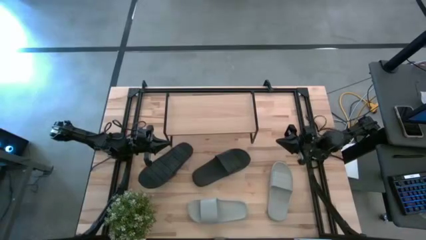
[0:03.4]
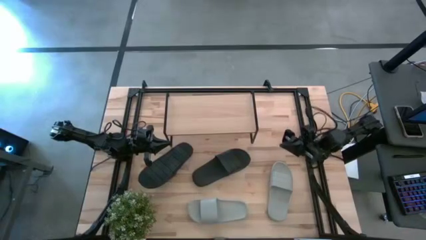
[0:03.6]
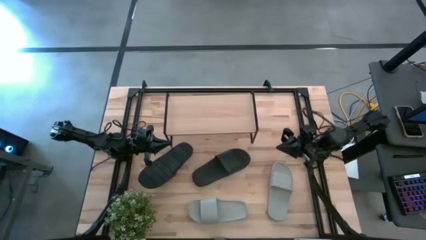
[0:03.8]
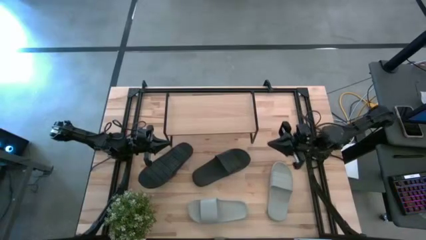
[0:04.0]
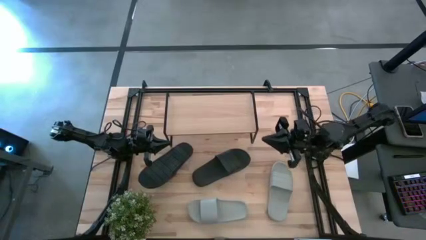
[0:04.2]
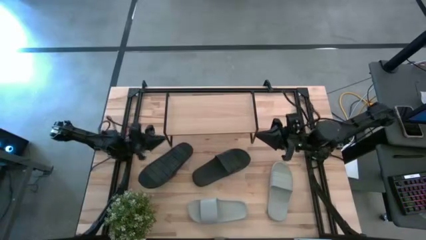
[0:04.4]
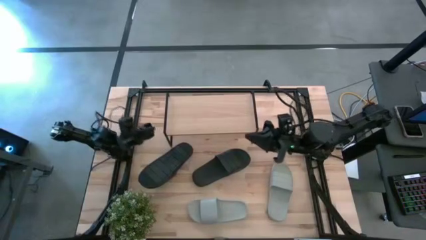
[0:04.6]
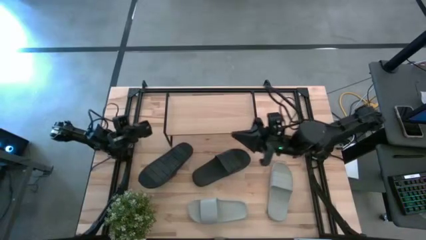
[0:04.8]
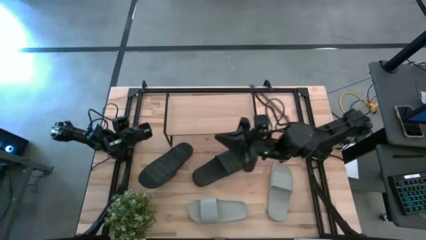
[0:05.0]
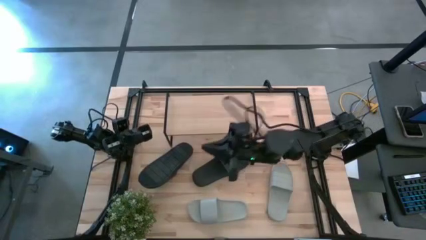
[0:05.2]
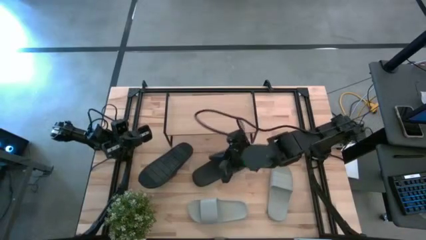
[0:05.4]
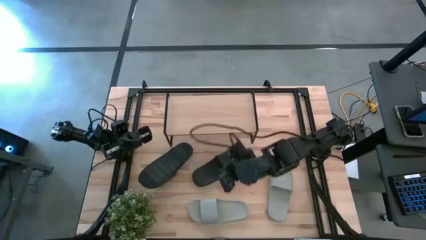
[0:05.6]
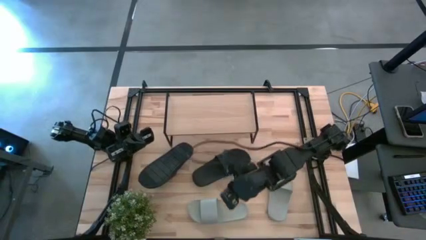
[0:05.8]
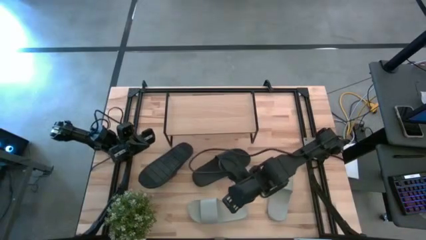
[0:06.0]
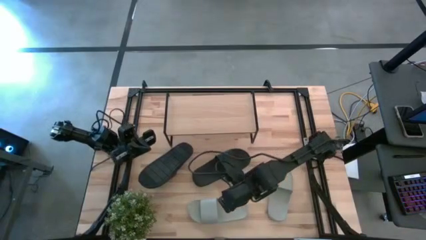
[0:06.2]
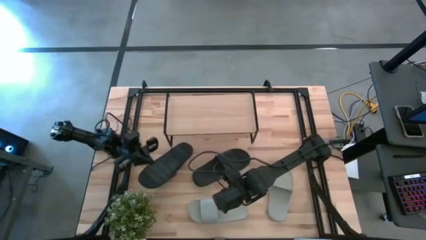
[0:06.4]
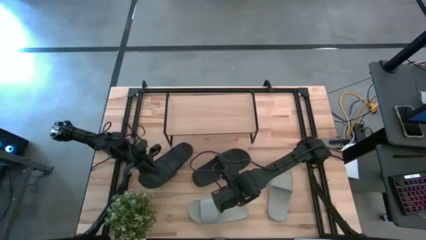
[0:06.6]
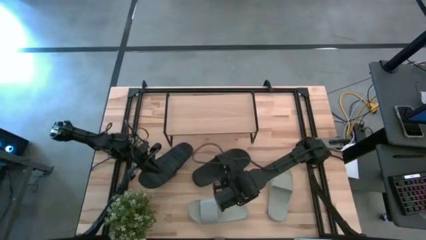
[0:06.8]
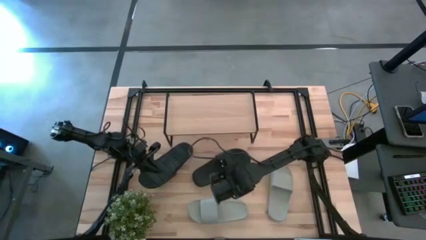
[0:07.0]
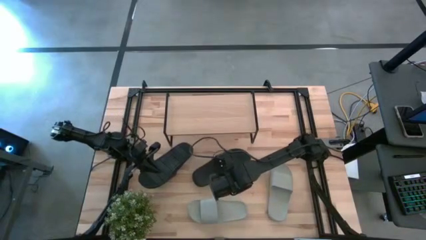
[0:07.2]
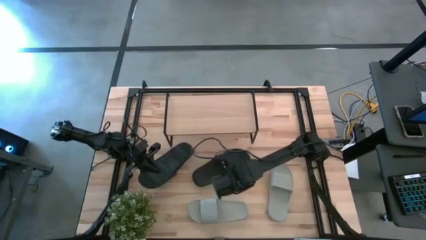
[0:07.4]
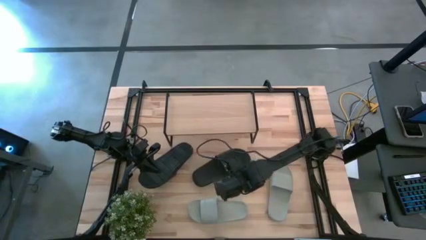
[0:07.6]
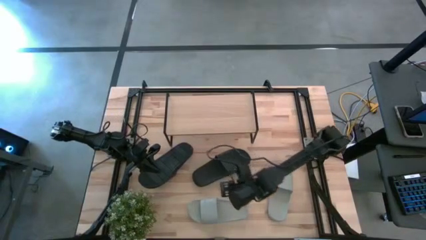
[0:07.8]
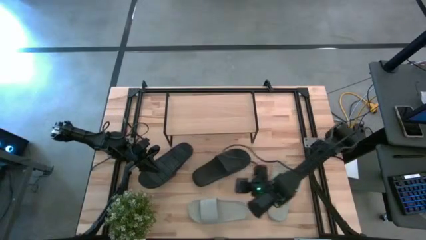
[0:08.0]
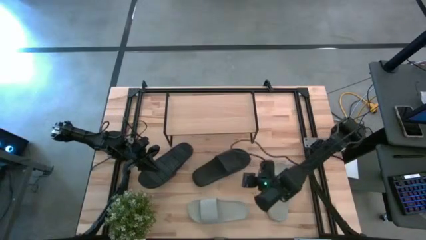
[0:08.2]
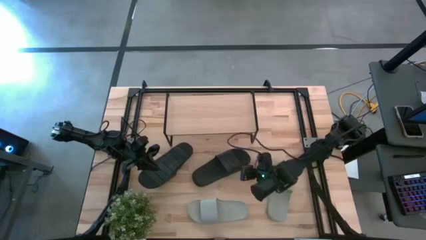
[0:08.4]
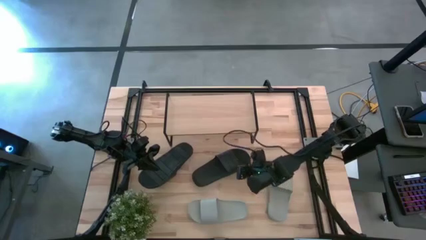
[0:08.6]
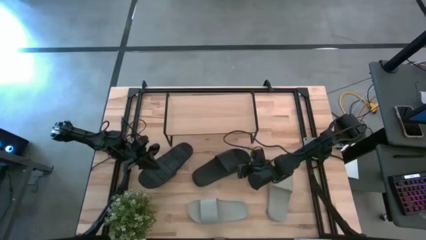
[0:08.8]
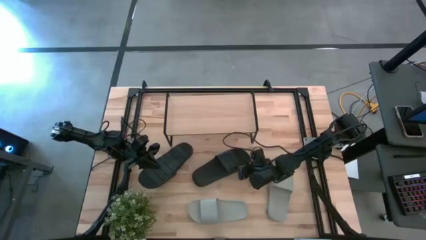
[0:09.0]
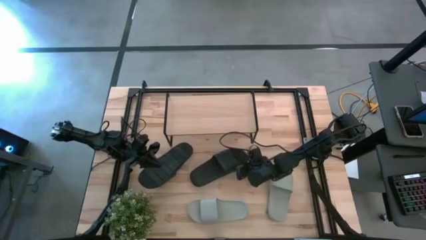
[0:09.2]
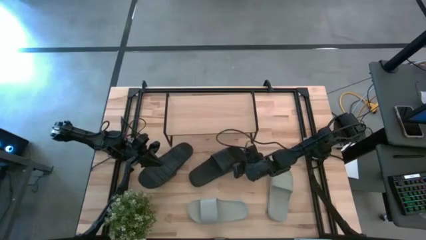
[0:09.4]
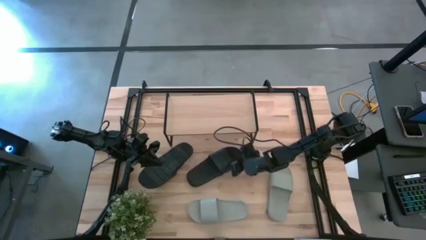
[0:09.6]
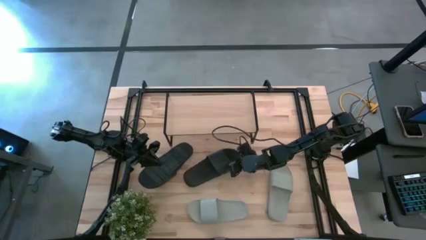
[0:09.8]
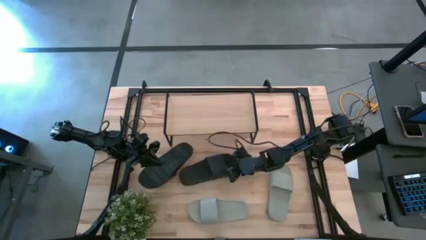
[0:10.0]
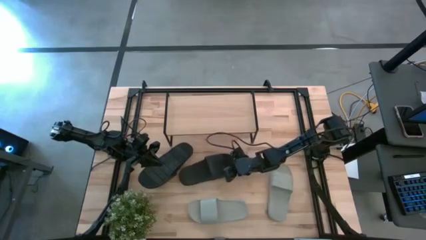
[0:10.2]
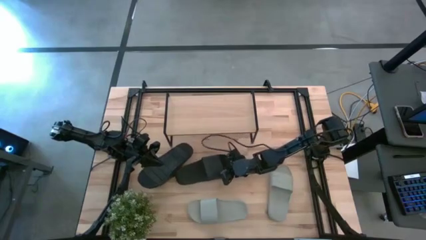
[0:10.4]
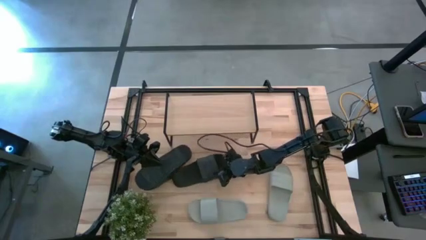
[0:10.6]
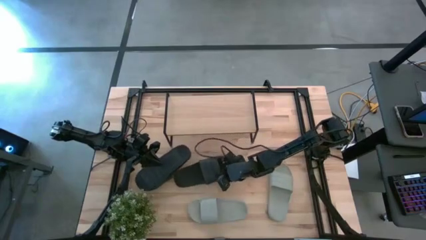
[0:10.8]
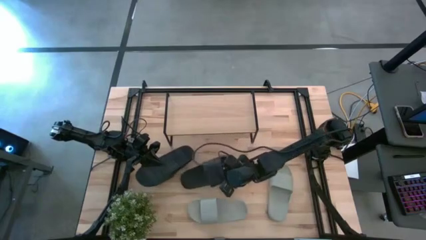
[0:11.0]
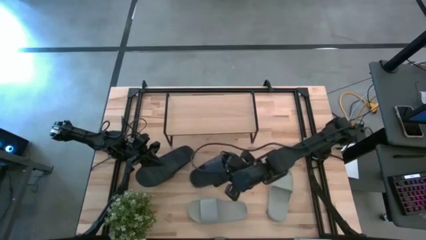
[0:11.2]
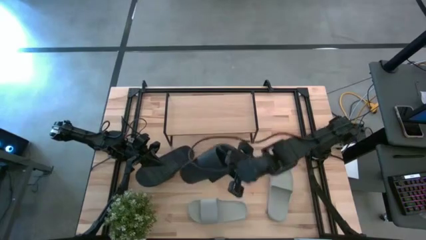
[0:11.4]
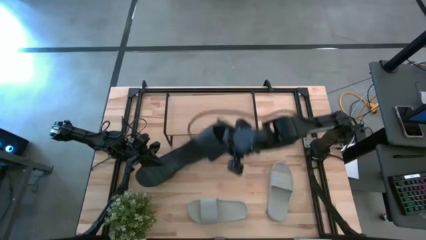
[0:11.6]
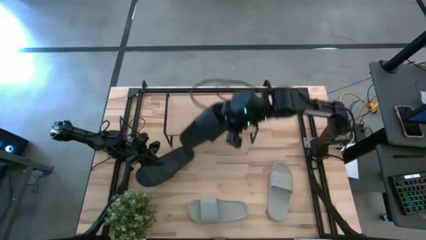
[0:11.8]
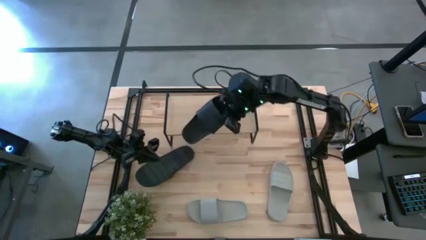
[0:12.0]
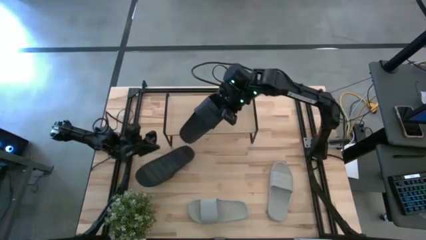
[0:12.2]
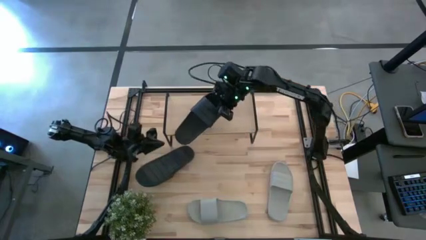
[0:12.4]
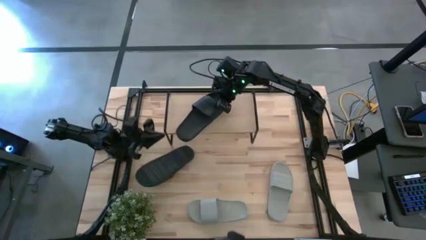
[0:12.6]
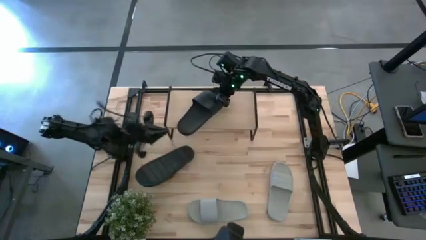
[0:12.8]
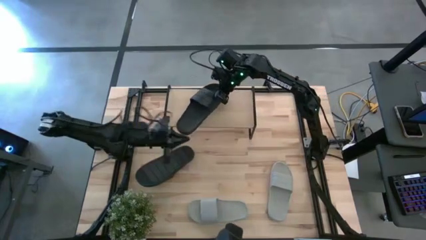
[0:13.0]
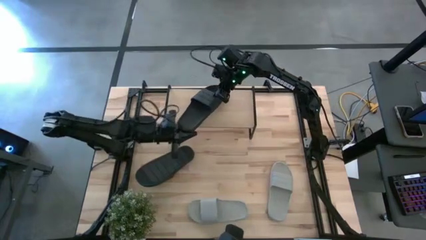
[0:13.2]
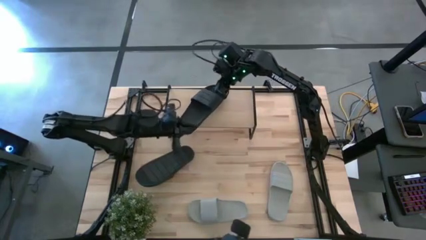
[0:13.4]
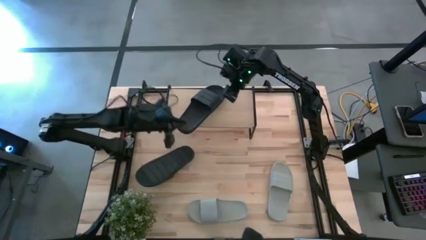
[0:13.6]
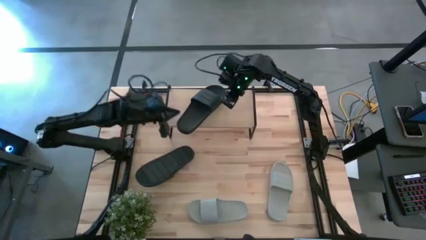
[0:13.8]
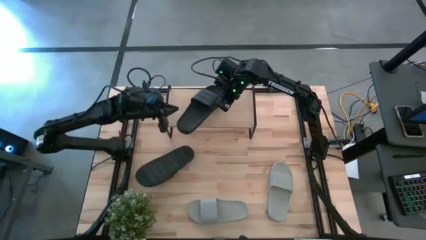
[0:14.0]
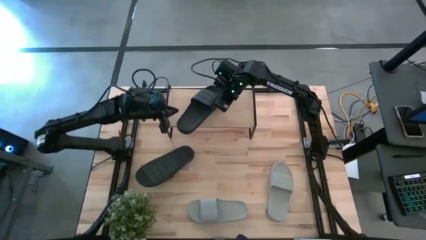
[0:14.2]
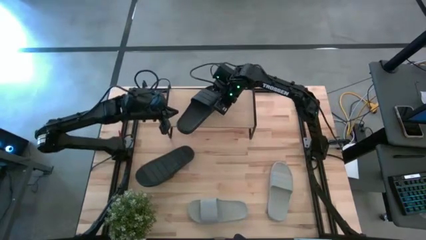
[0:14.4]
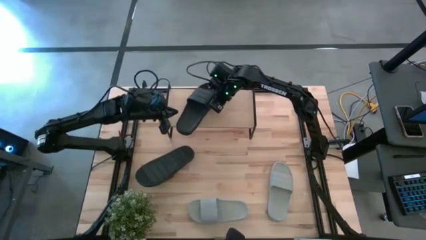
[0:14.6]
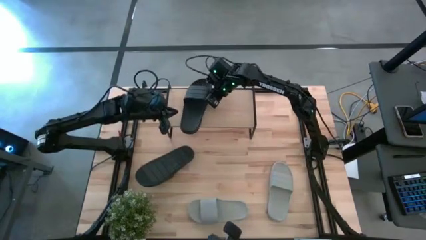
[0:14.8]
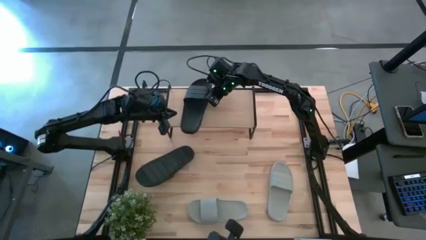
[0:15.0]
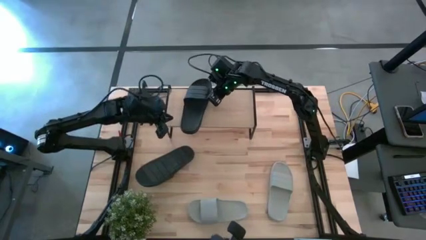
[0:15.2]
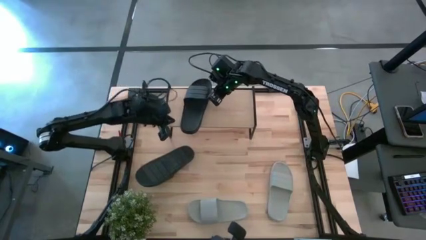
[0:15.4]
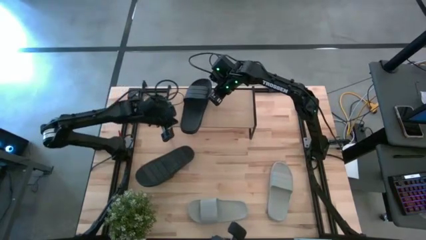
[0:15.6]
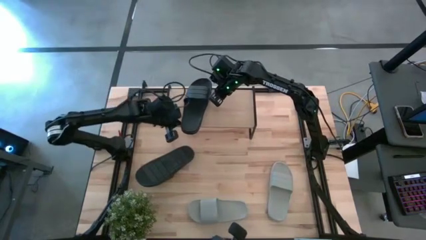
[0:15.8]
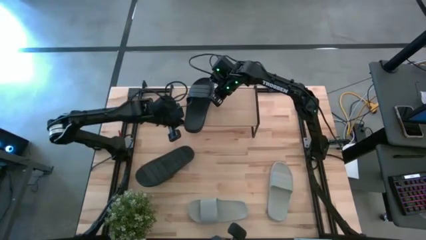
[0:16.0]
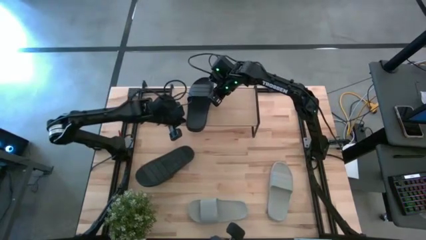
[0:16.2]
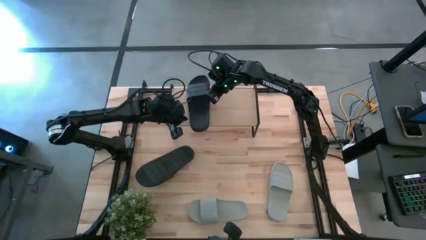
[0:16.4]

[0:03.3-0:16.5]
Task: Pick and place slides into the shelf
Put the right black slide on the shelf
